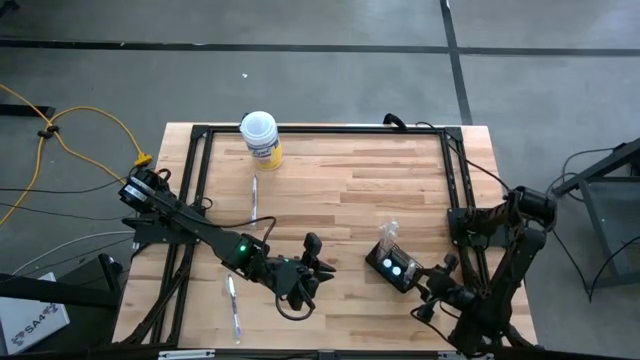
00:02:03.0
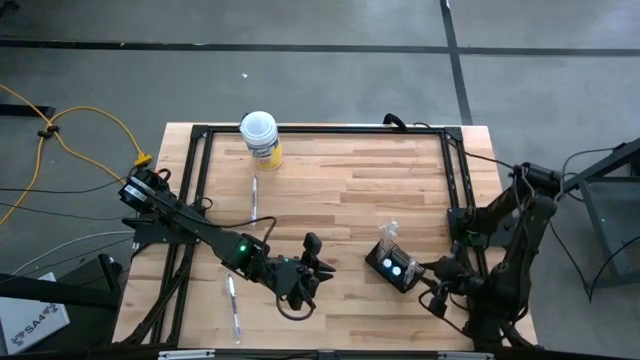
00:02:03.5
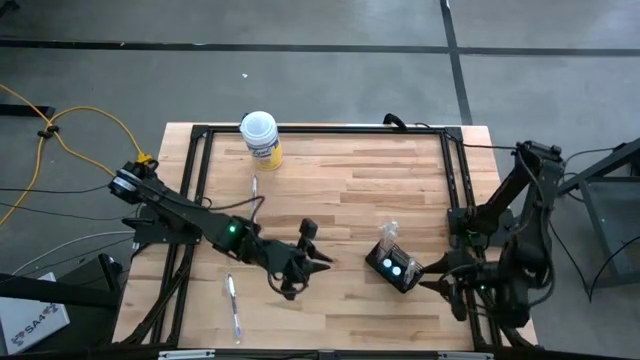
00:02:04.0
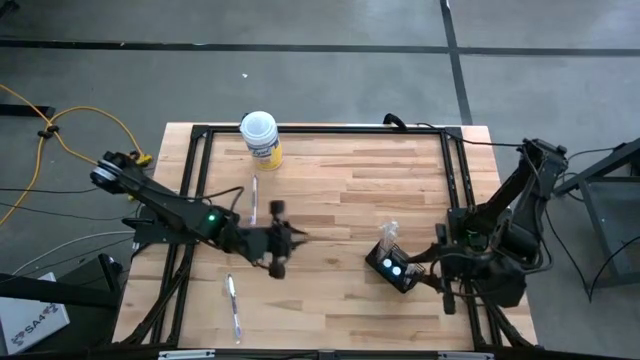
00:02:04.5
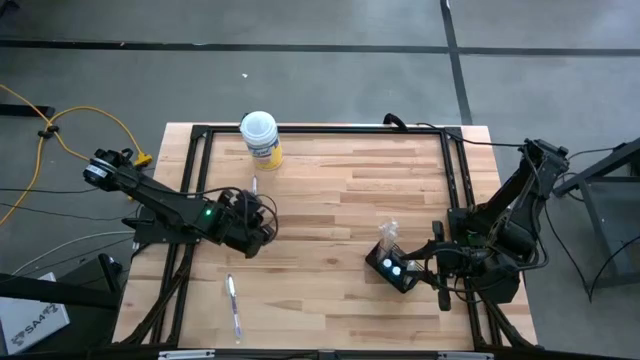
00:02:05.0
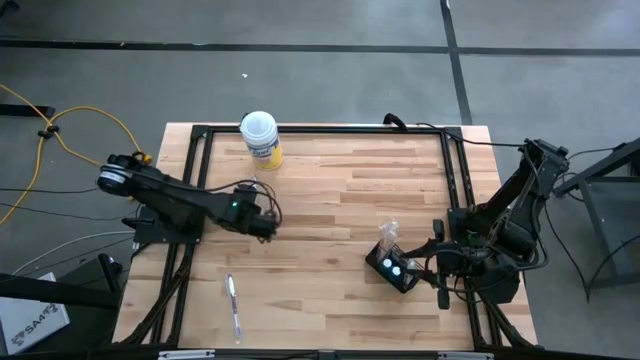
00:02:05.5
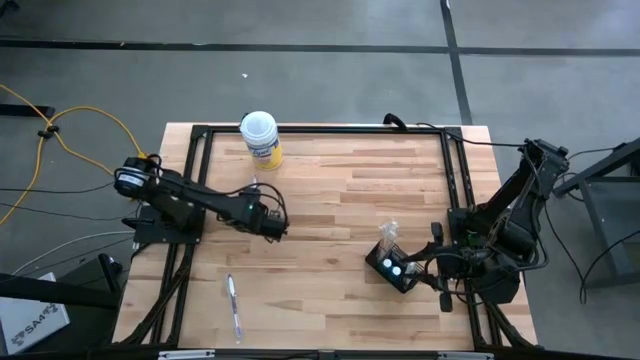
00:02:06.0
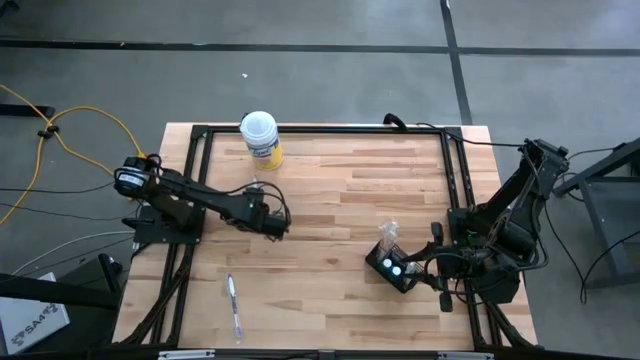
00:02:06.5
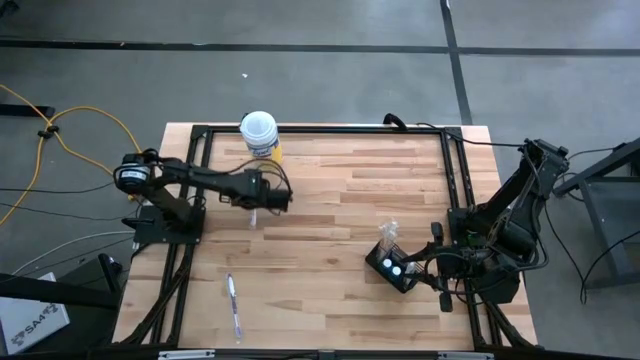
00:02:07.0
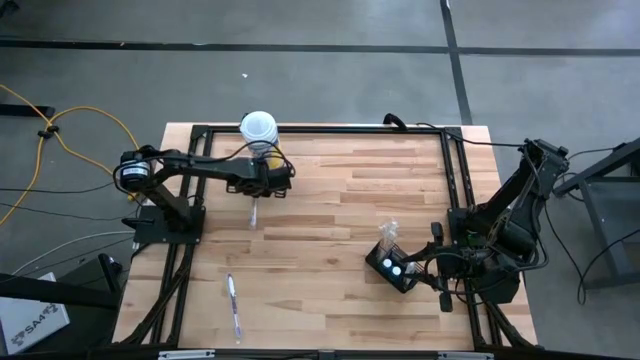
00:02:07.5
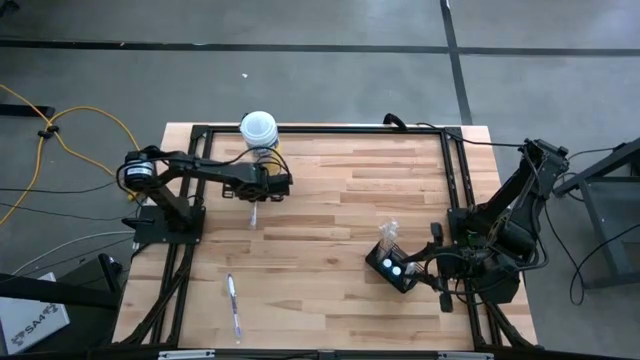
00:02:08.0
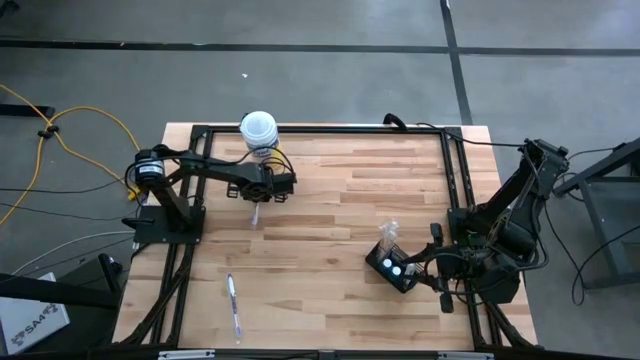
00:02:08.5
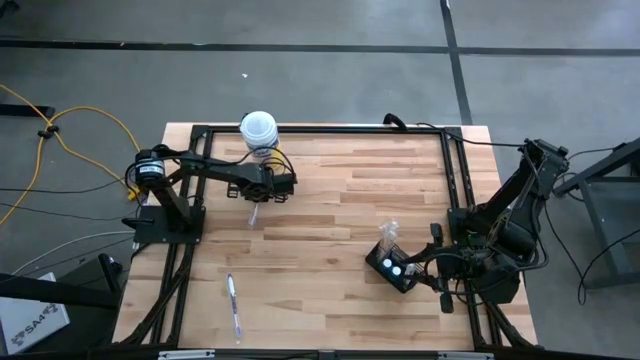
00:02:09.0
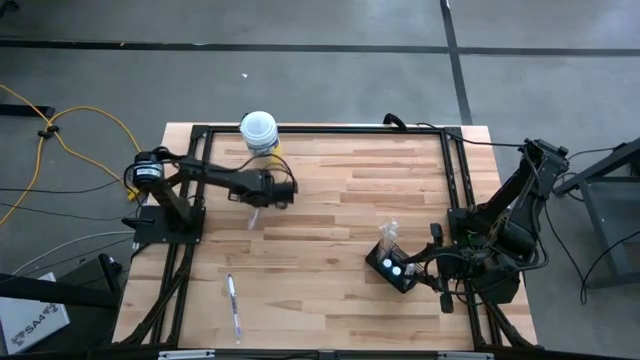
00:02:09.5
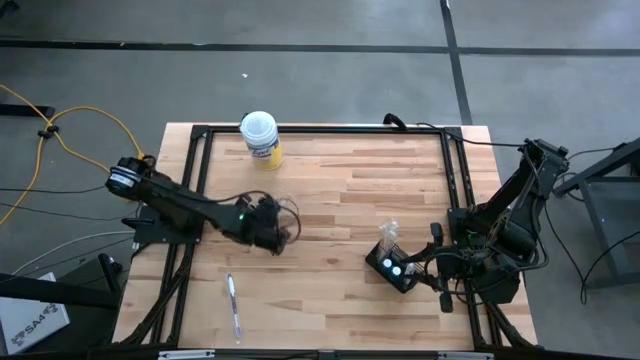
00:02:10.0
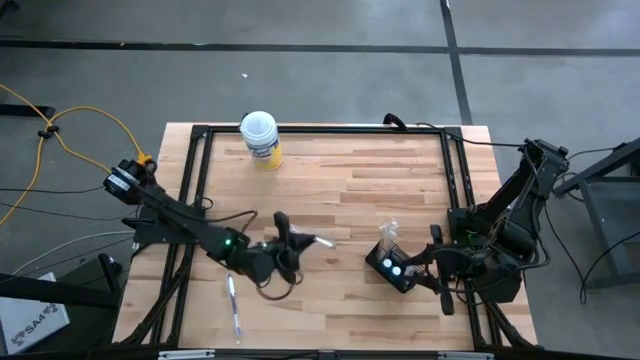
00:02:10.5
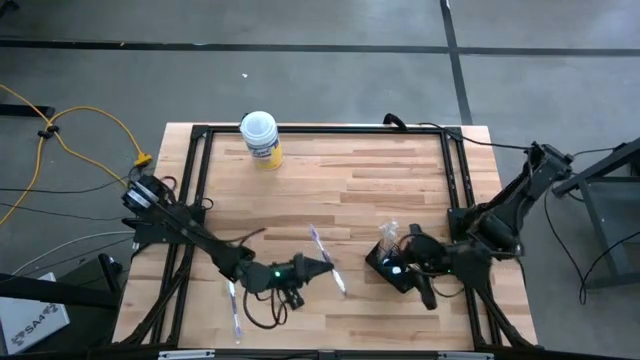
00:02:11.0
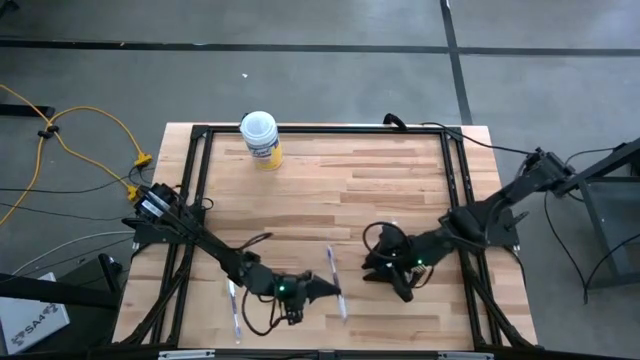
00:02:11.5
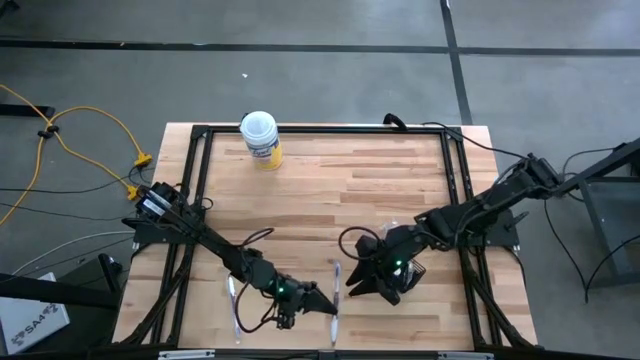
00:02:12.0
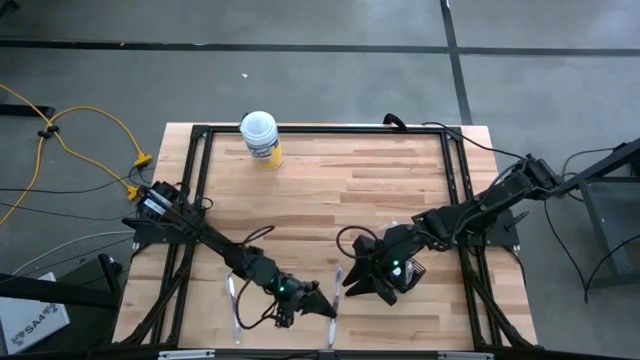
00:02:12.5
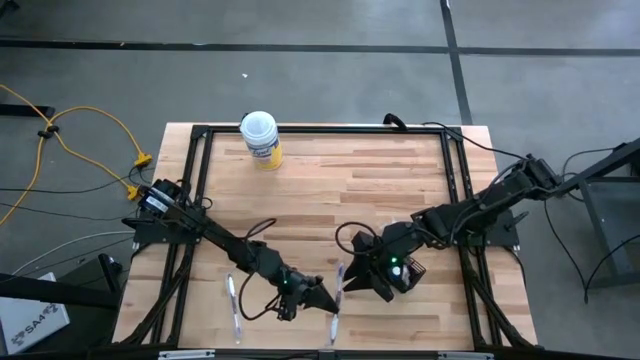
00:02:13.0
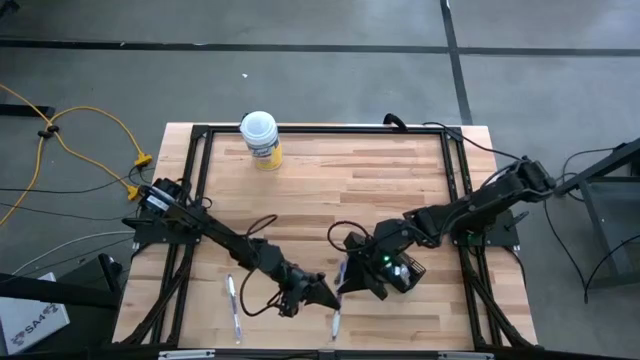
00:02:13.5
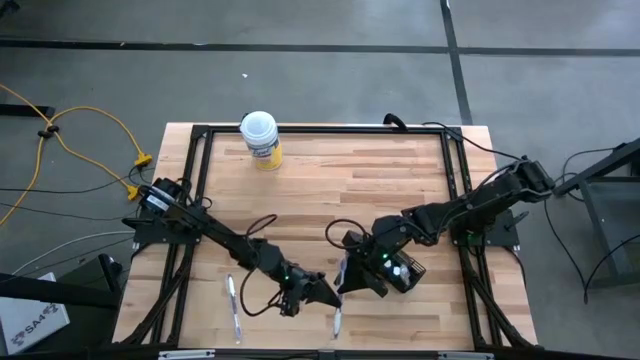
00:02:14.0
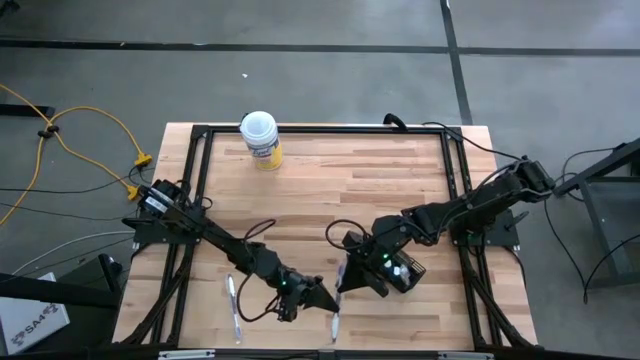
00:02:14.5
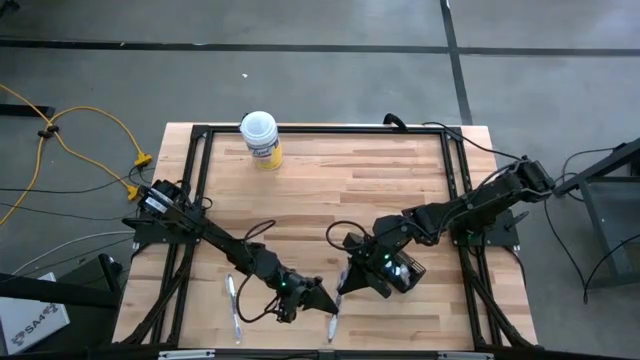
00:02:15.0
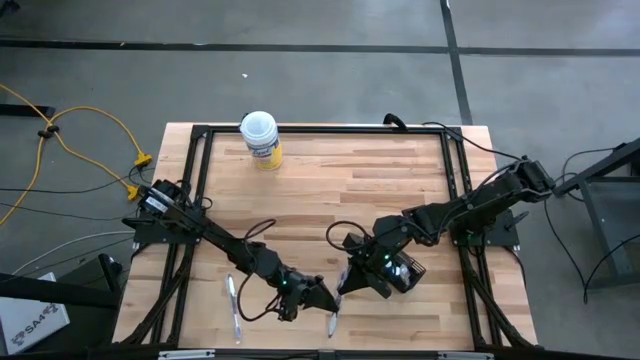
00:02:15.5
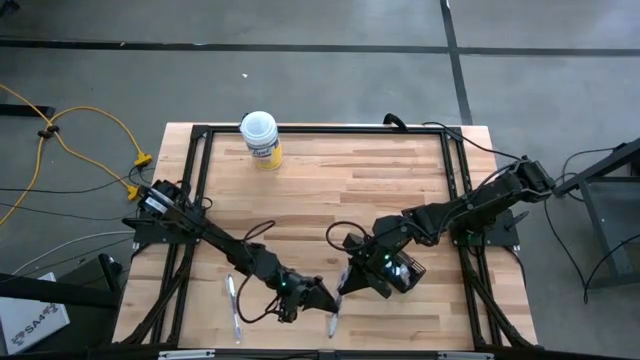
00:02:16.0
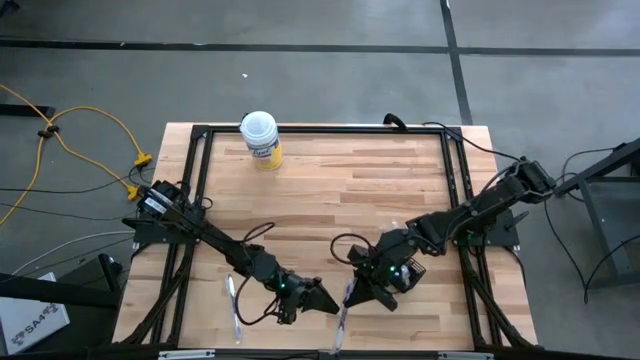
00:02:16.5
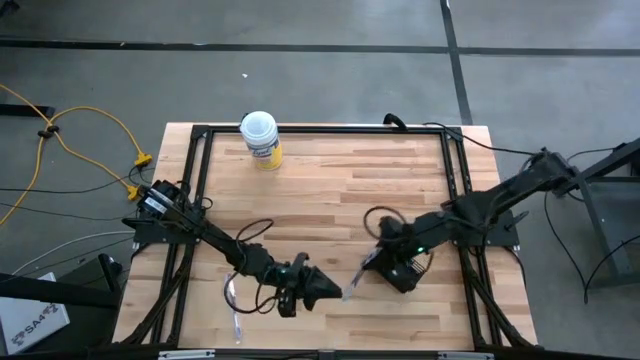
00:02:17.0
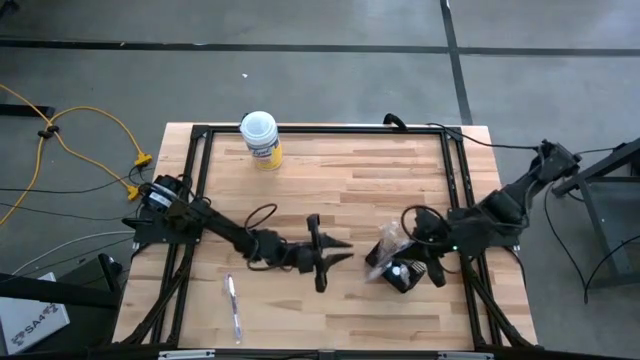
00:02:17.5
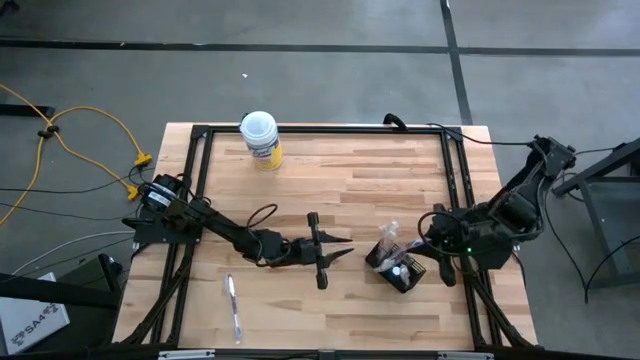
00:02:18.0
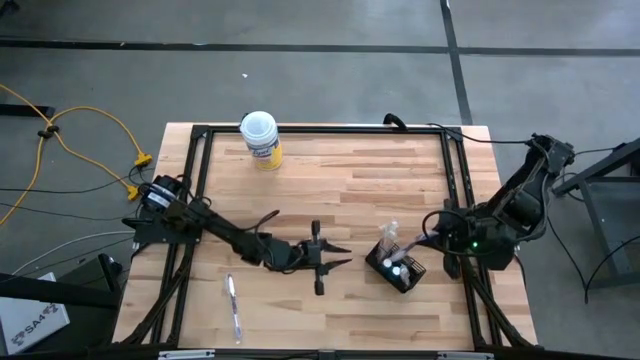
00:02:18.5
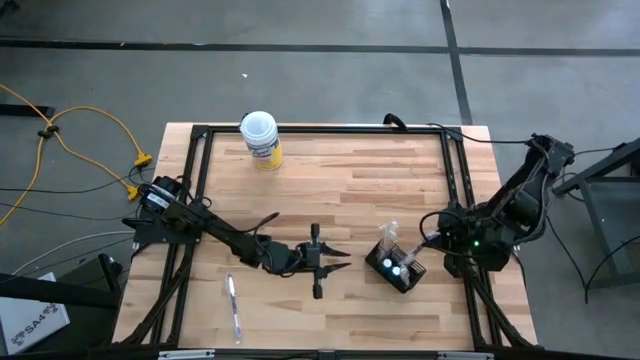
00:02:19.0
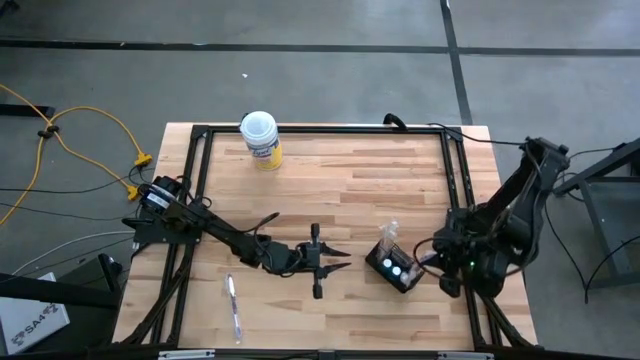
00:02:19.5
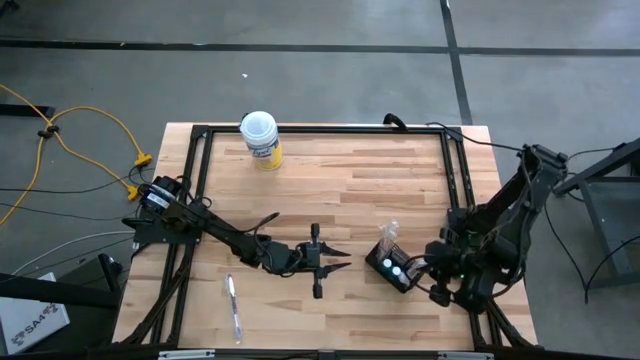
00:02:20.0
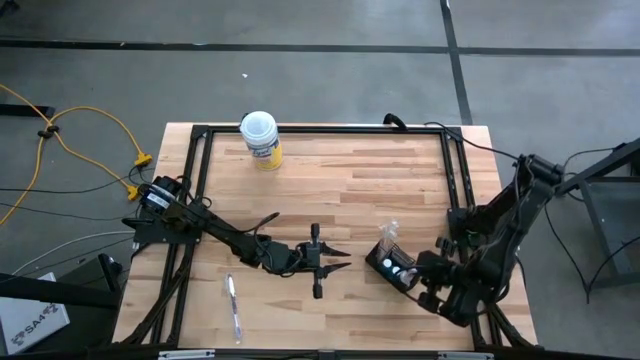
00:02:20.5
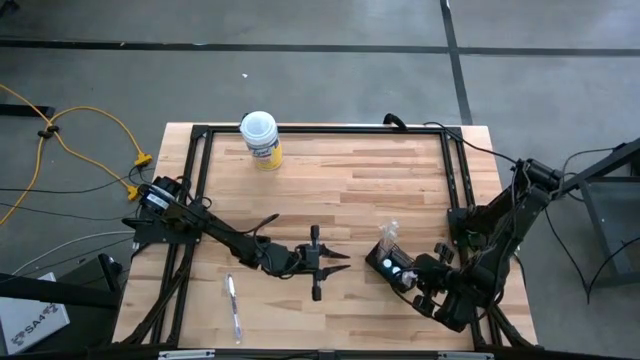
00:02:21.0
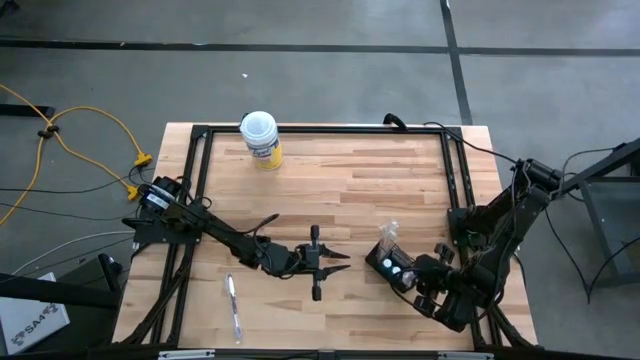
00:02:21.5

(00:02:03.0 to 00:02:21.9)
Task: Pick & Place toothbrushing station
Put the top purple toothbrush into the wire organizer
